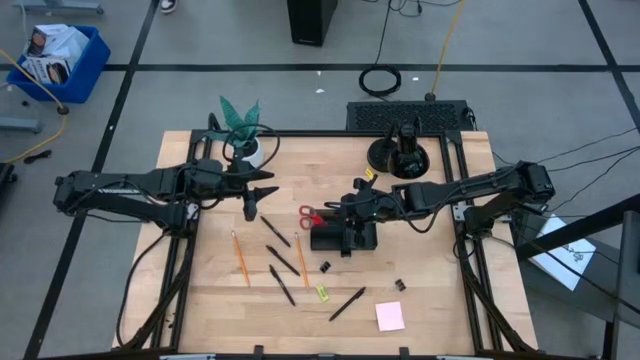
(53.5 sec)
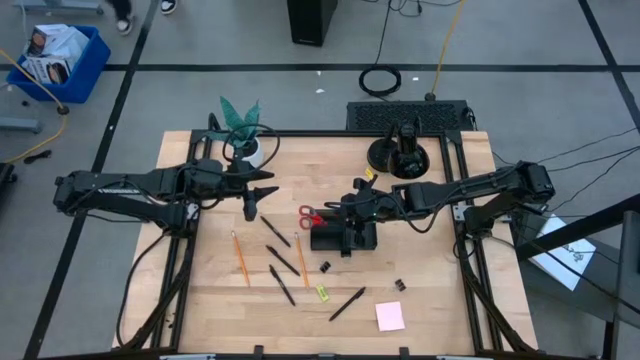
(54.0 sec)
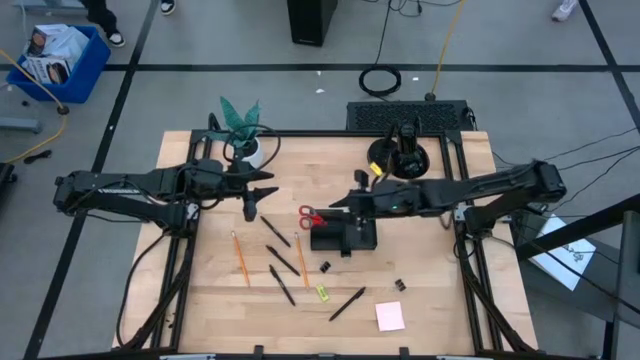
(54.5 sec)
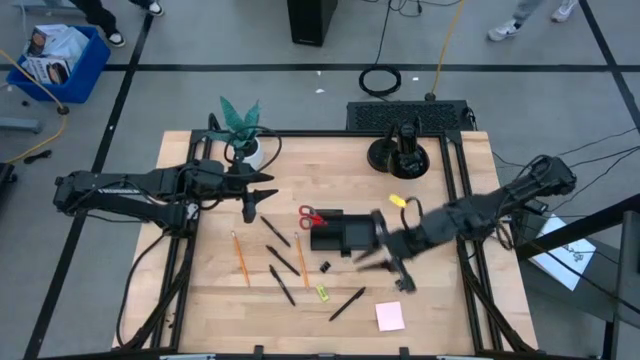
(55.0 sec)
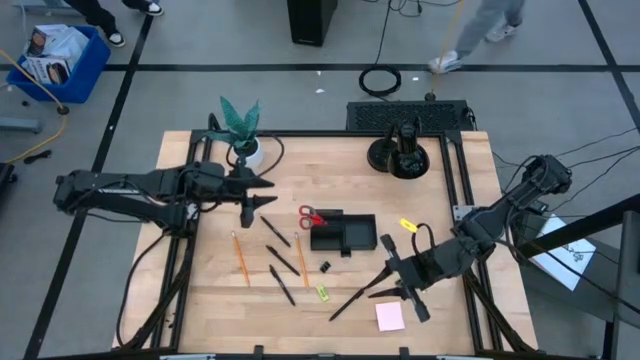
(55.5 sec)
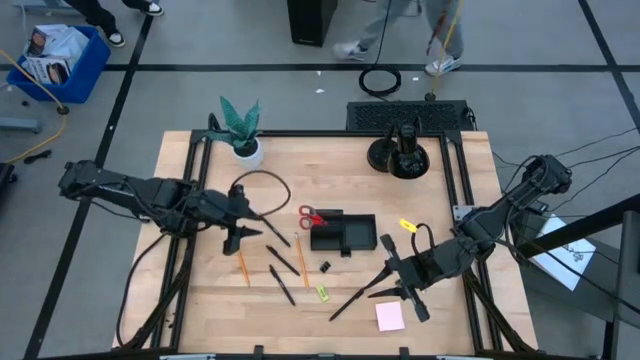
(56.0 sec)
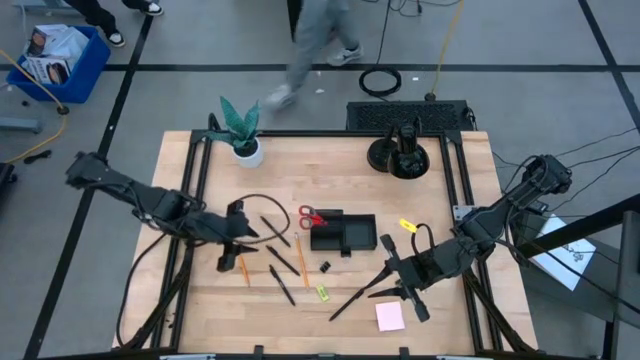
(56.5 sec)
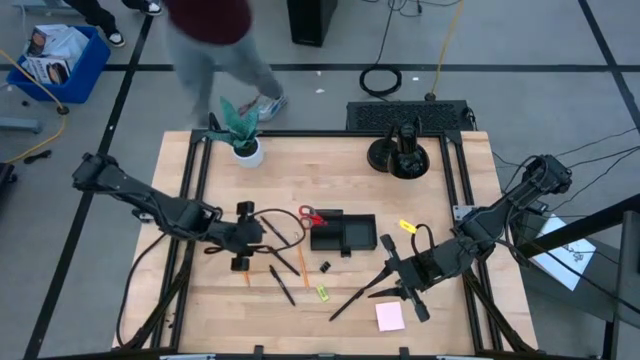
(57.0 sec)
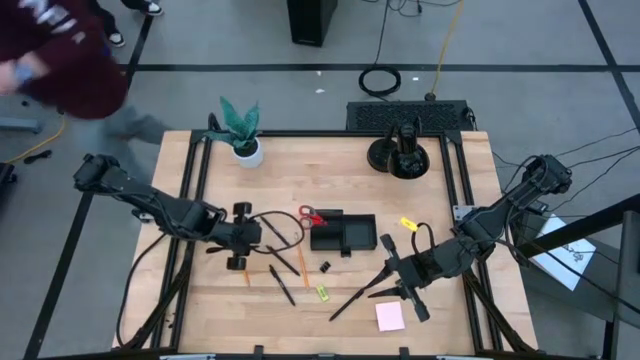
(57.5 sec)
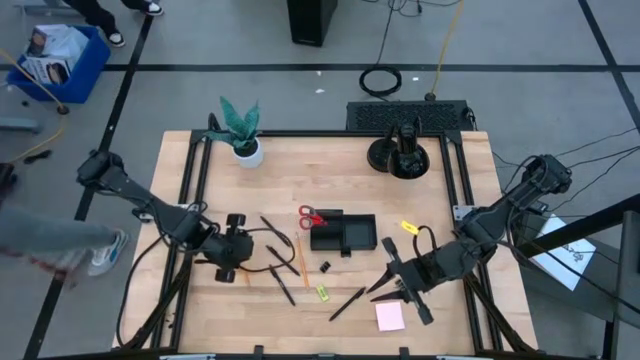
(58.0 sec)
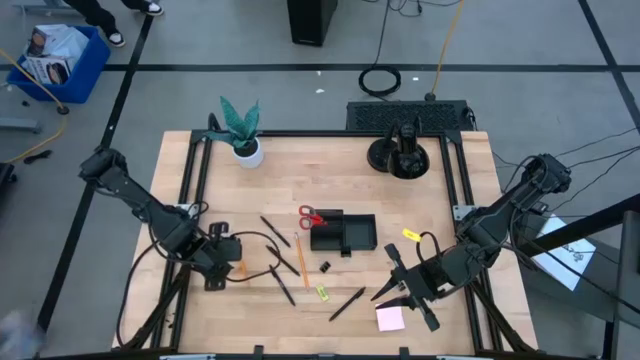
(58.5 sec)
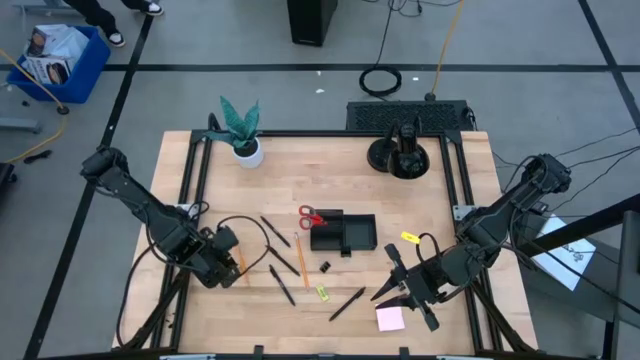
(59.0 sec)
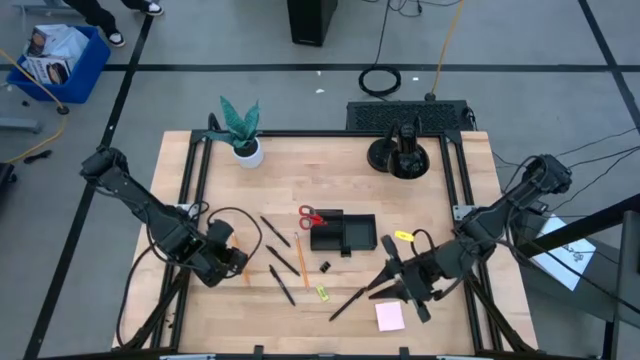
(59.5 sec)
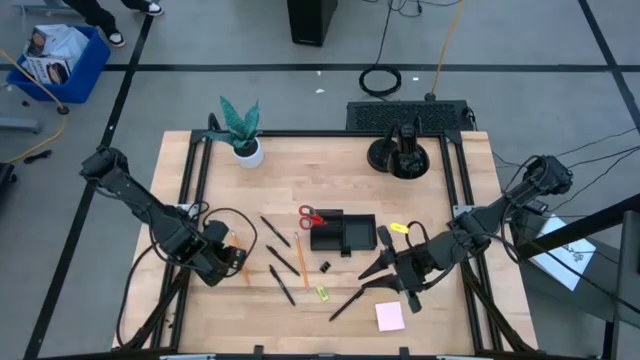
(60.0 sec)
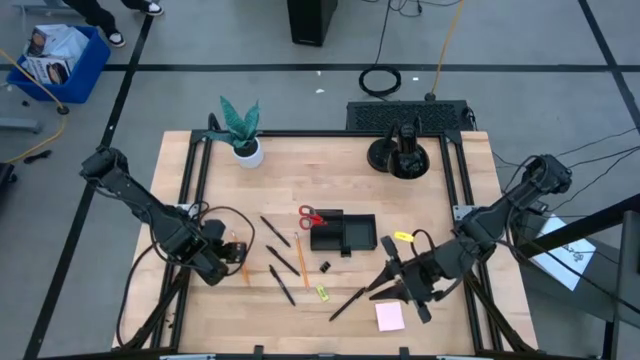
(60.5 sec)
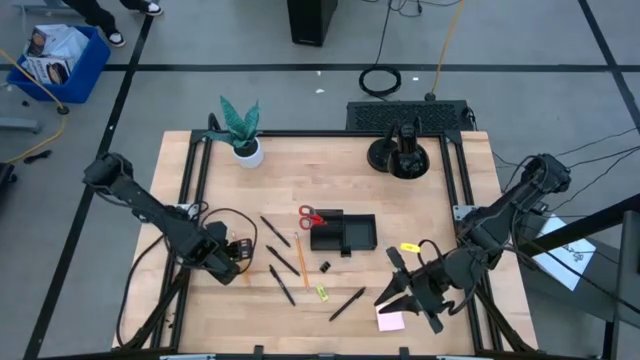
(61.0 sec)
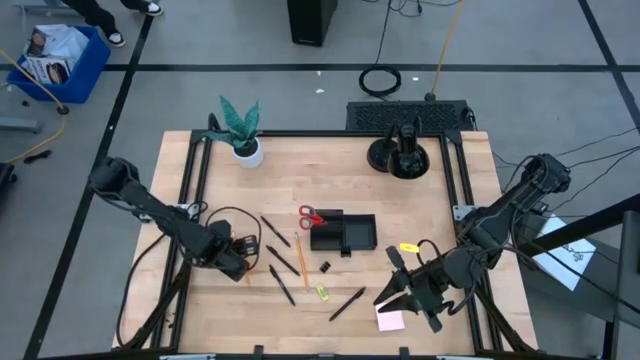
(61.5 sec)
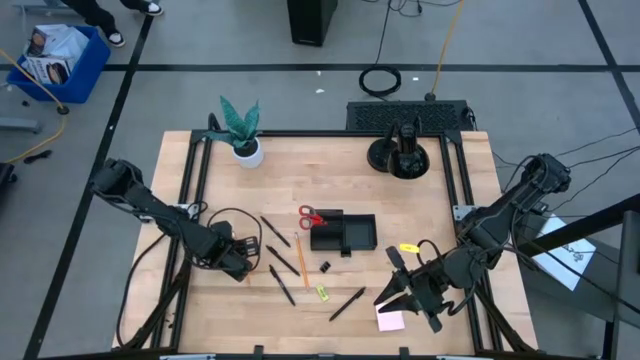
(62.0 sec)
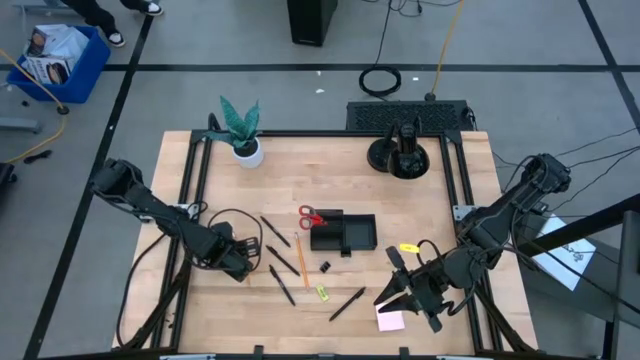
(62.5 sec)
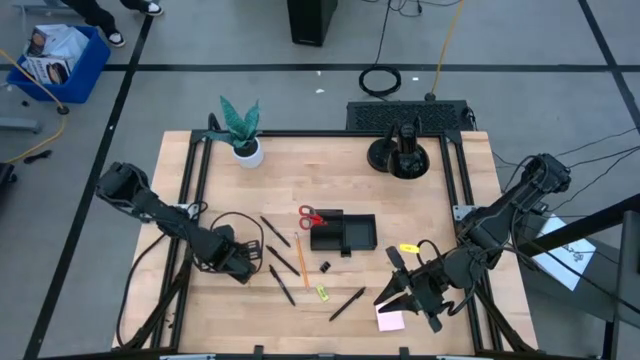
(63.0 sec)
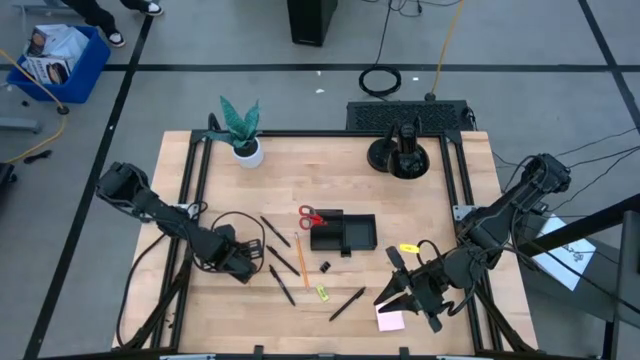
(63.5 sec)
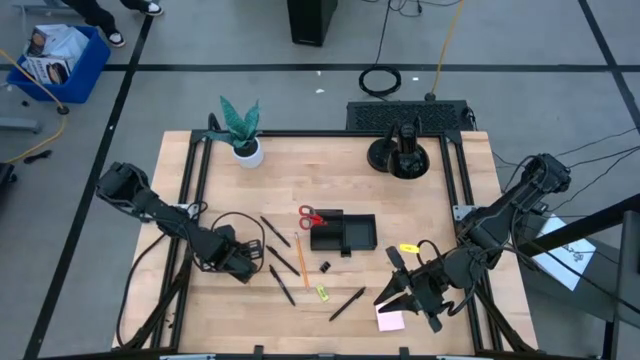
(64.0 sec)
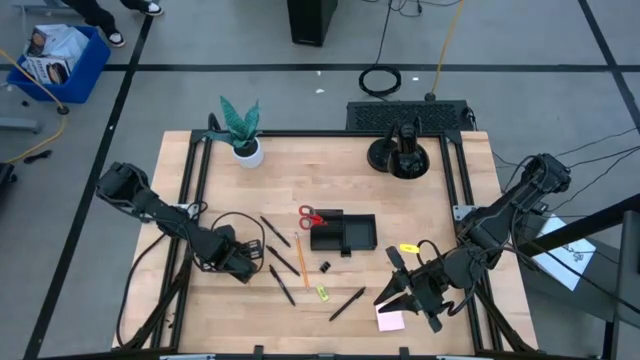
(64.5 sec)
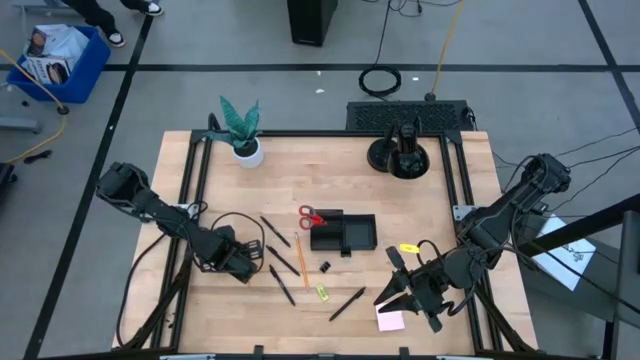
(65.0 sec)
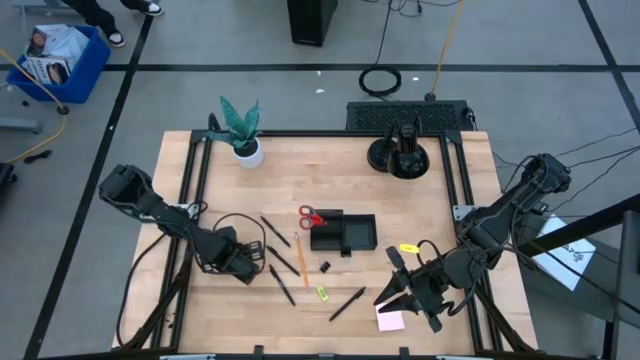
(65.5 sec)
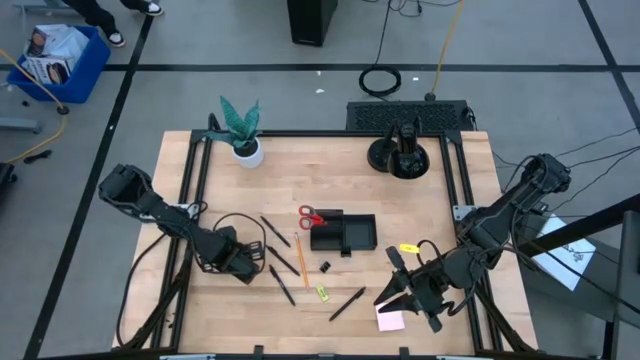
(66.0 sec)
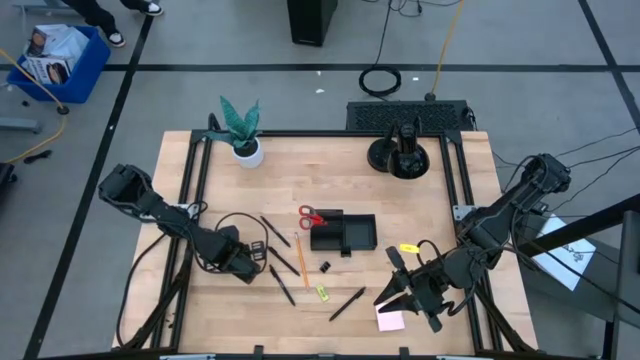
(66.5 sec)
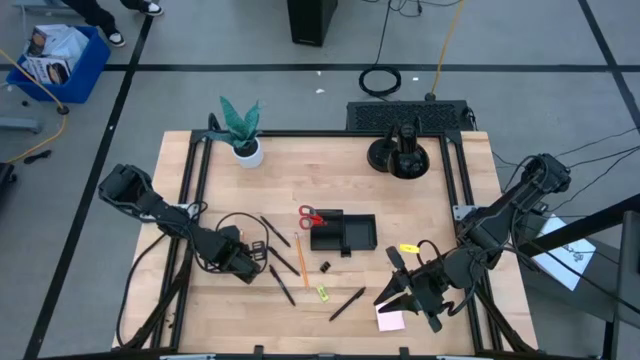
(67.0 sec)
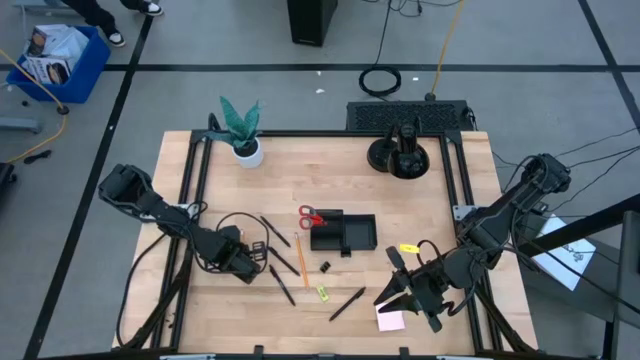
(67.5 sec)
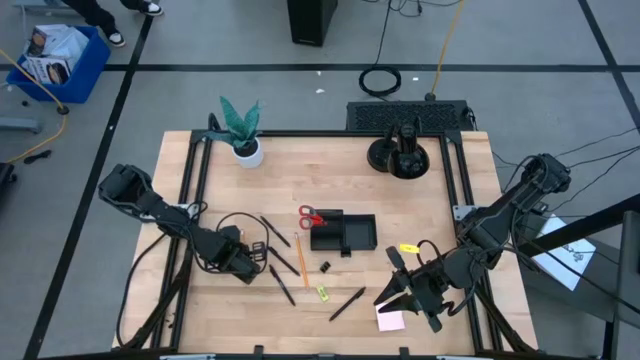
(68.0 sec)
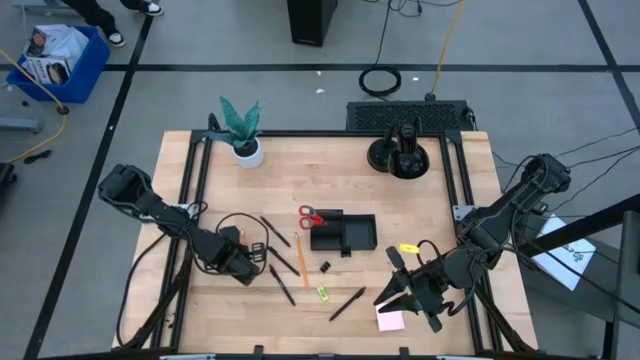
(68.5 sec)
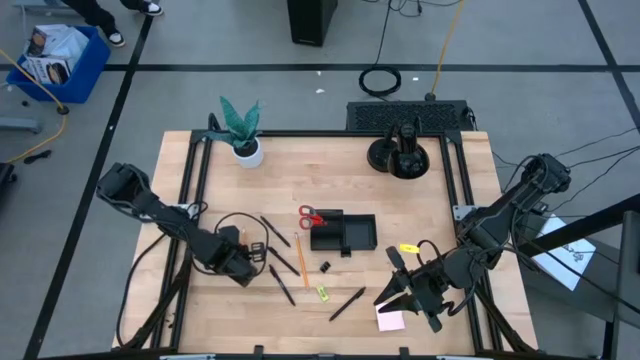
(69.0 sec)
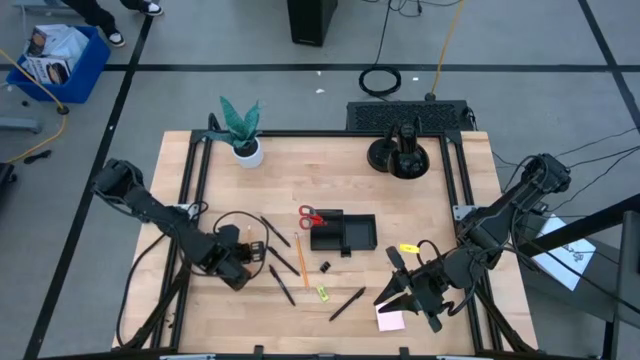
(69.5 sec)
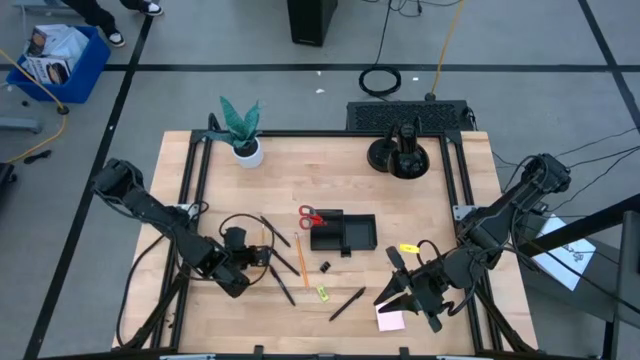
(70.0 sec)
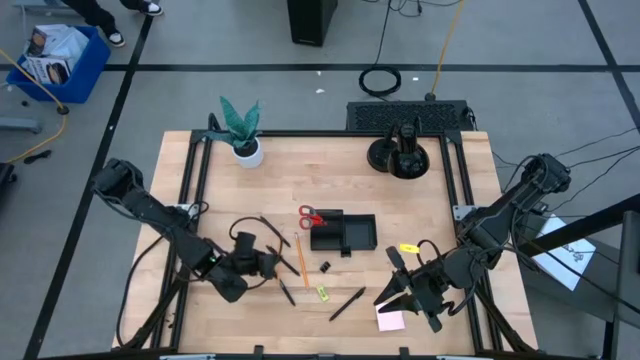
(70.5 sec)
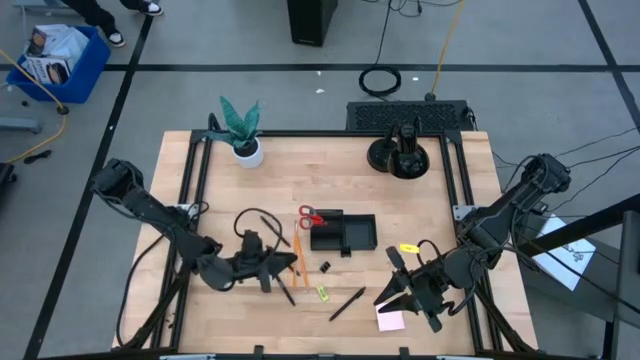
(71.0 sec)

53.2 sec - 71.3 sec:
Task: Pick and place office supplies into organizer
Put the left yellow pencil into the black desk organizer

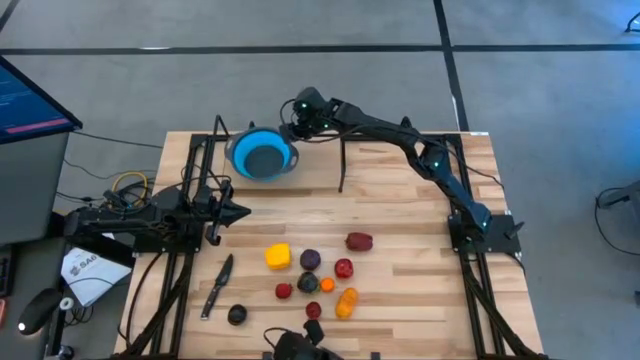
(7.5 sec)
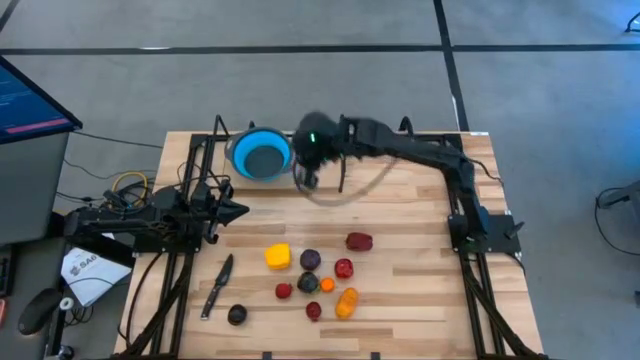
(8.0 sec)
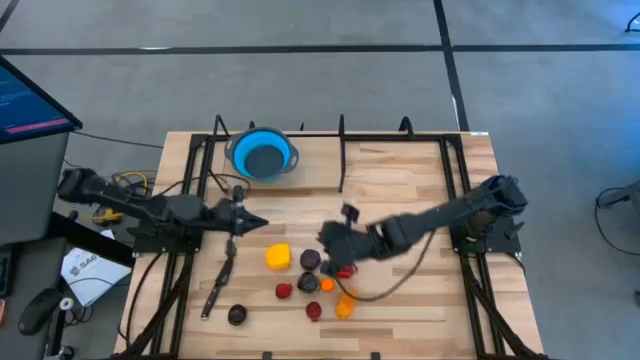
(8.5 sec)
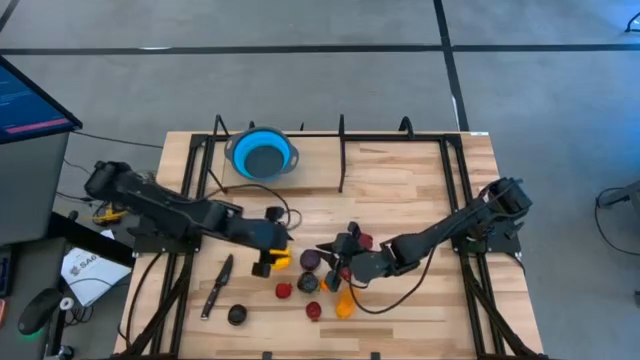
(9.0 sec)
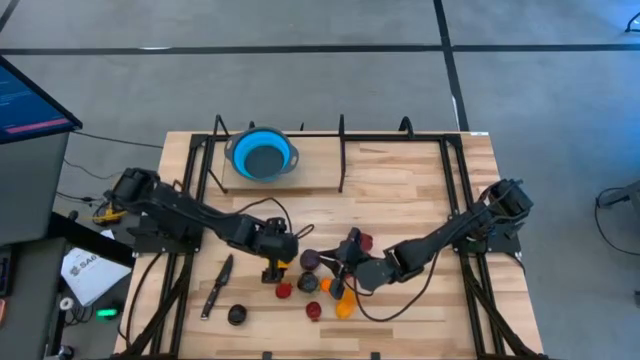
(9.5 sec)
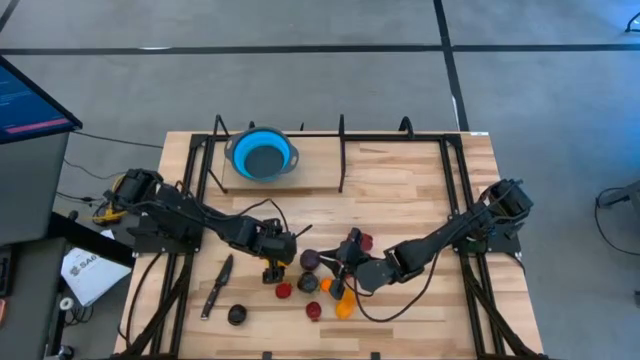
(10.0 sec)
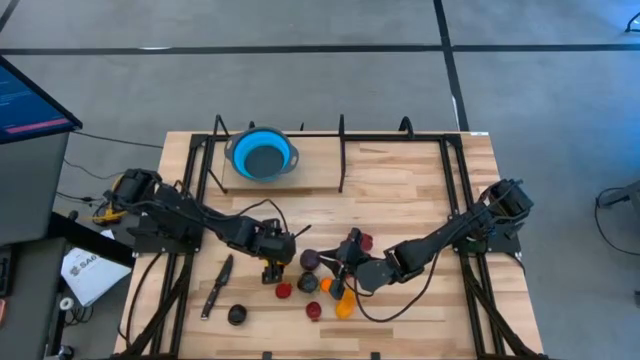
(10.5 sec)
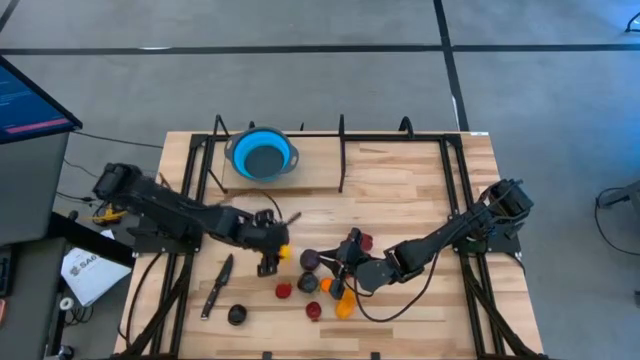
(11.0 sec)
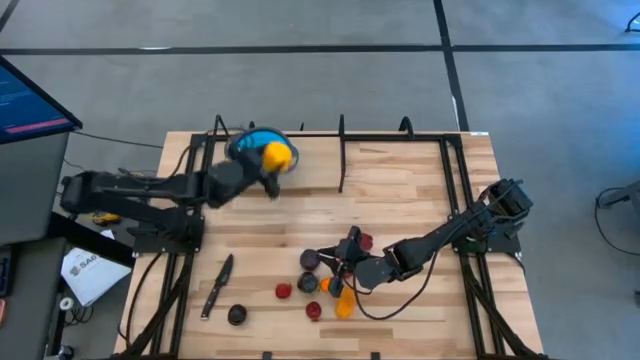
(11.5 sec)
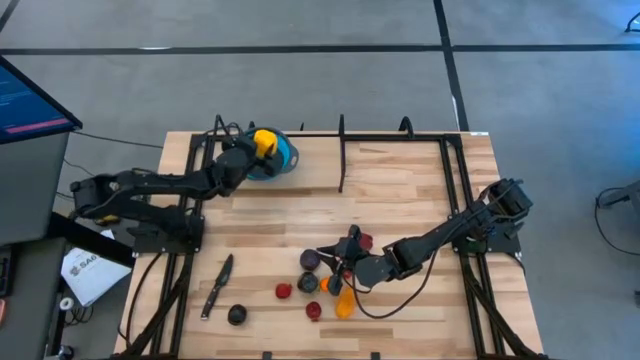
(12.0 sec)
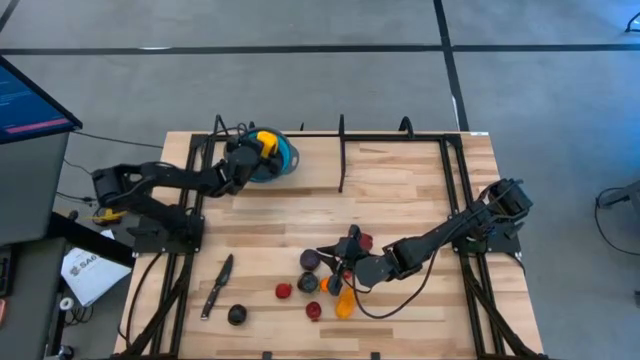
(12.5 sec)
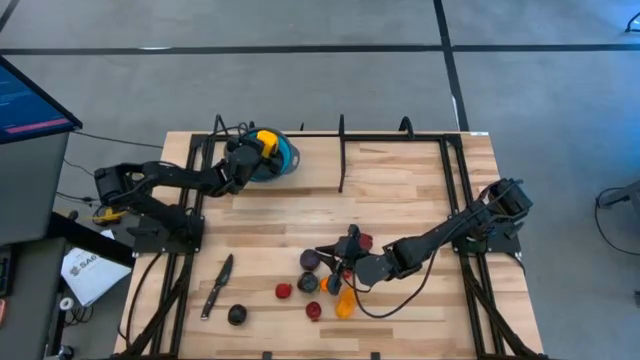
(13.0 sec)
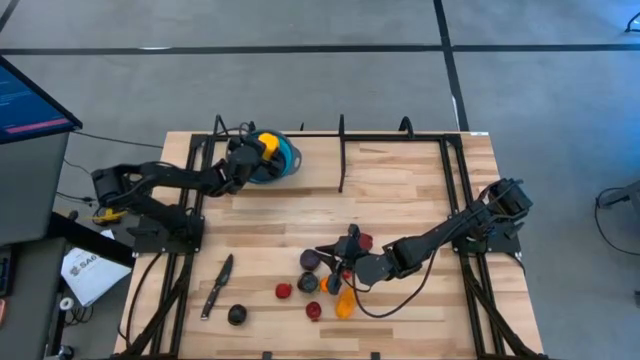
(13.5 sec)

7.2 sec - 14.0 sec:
Task: Pick & Place Fruit
Put the yellow bell pepper in the blue strainer bowl on the shelf
